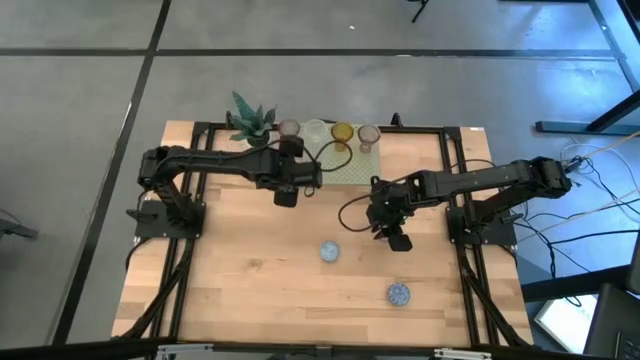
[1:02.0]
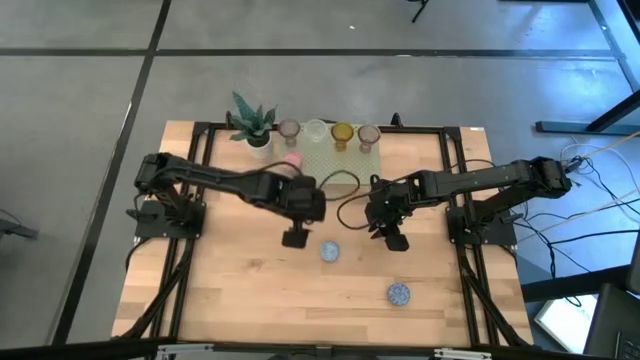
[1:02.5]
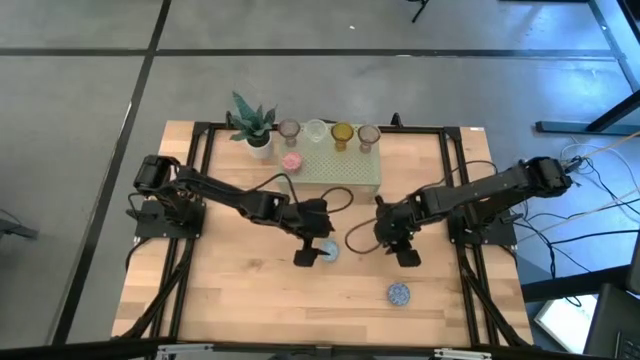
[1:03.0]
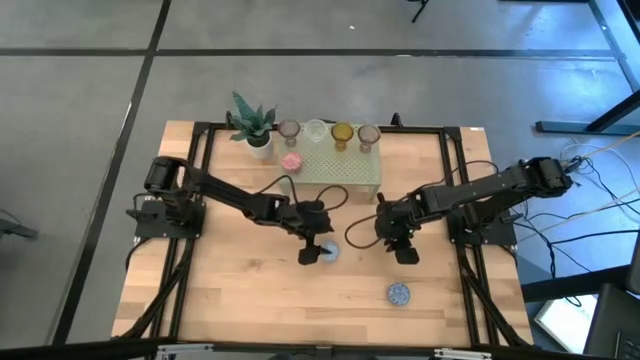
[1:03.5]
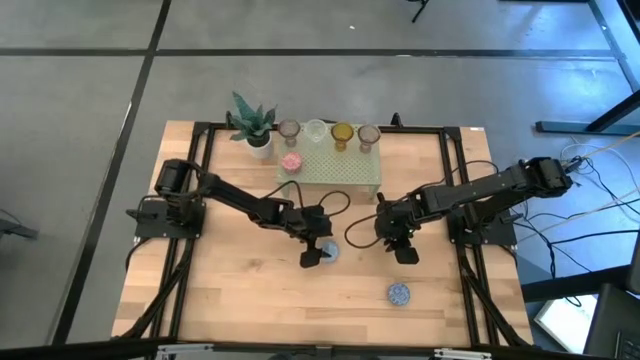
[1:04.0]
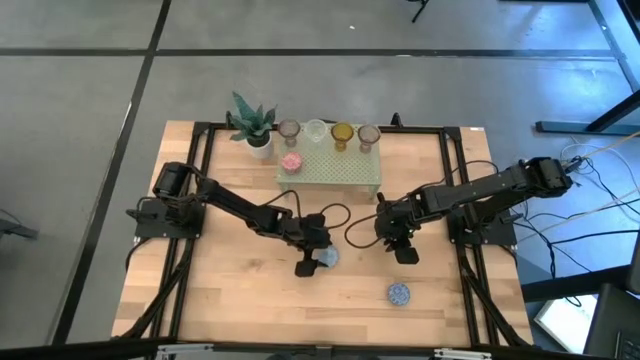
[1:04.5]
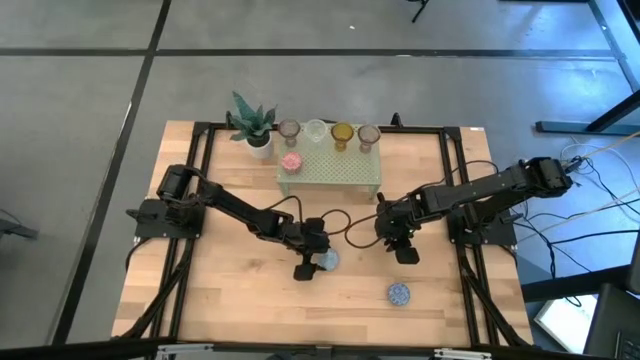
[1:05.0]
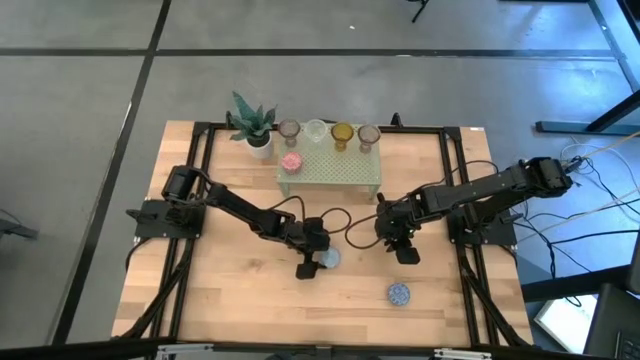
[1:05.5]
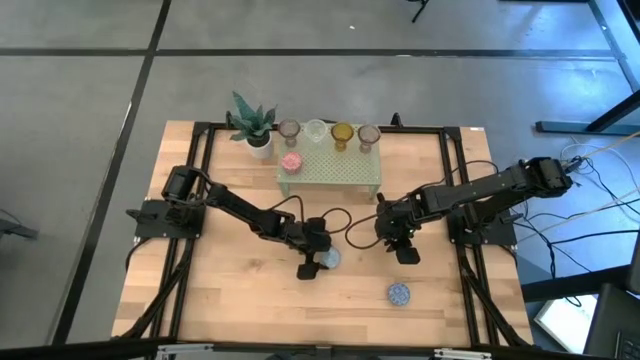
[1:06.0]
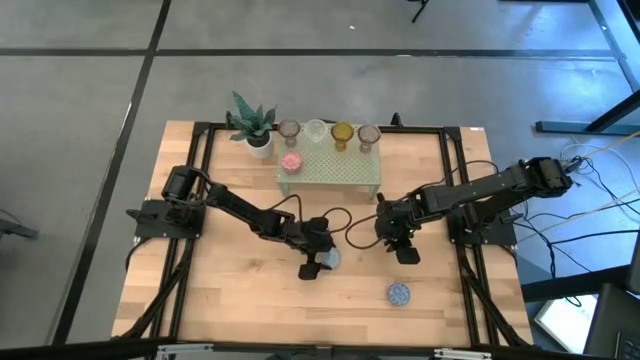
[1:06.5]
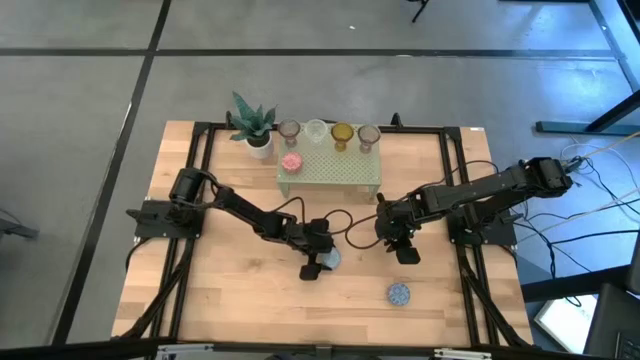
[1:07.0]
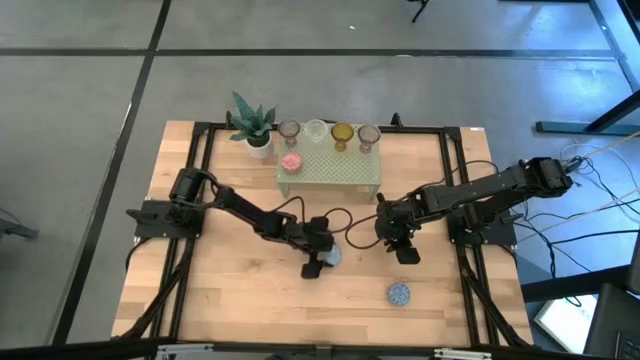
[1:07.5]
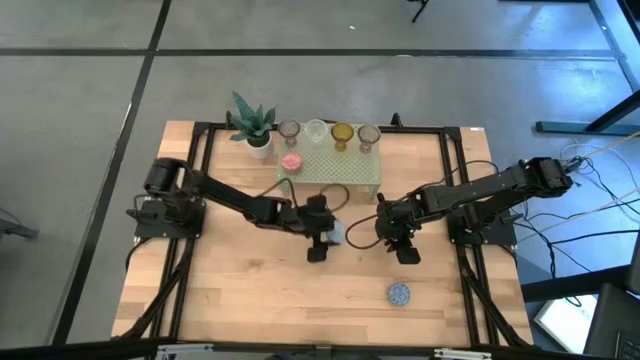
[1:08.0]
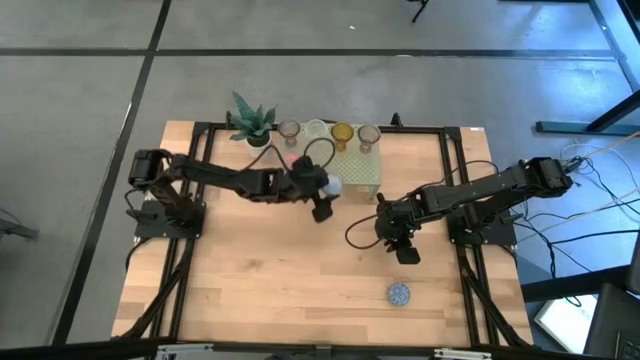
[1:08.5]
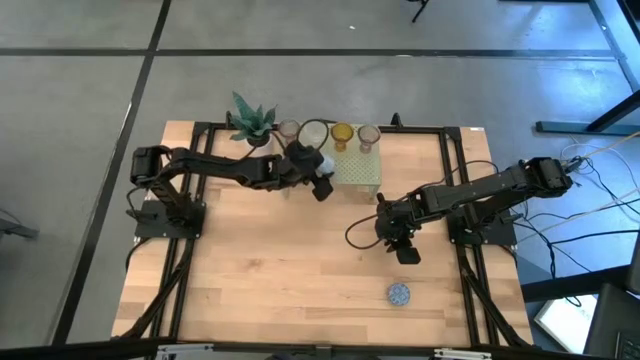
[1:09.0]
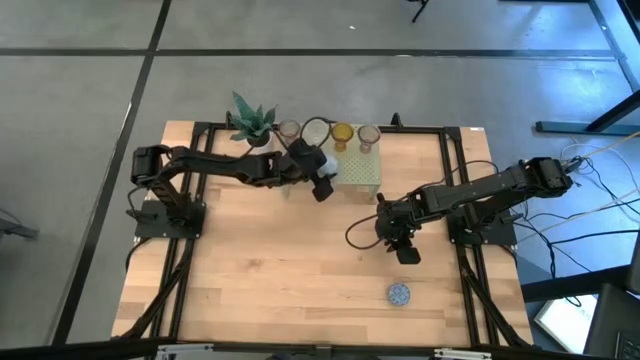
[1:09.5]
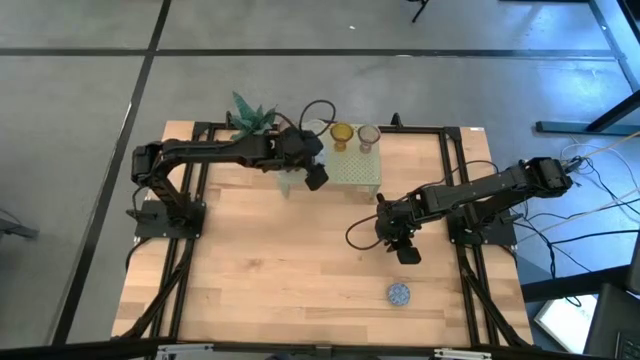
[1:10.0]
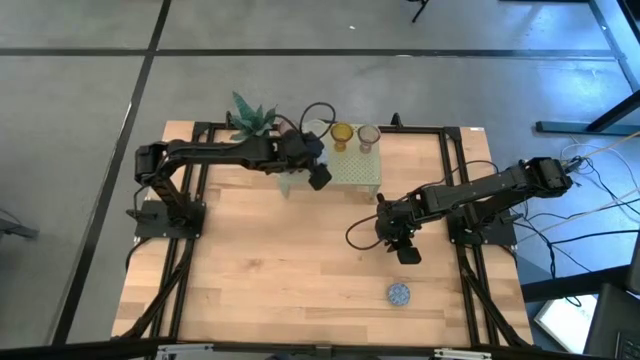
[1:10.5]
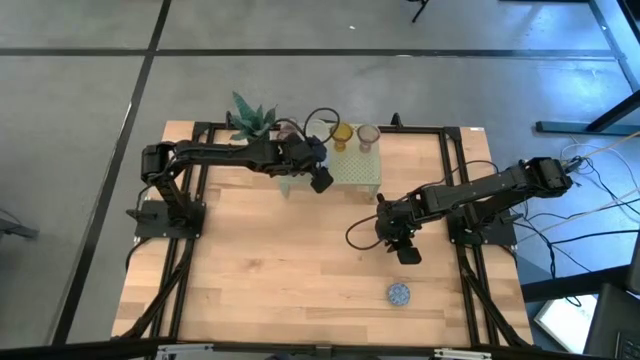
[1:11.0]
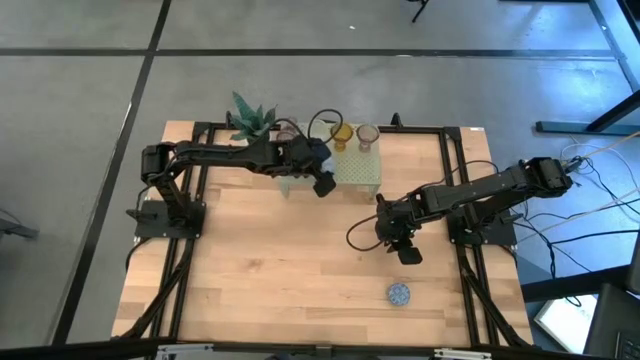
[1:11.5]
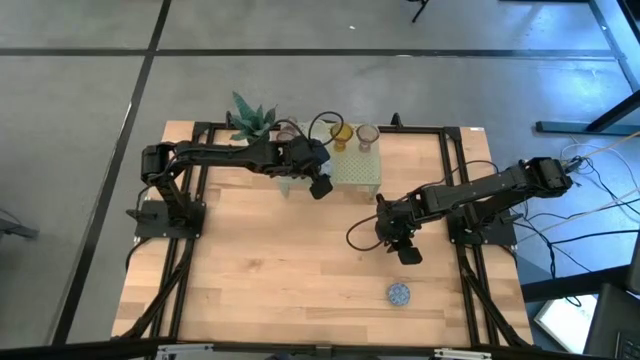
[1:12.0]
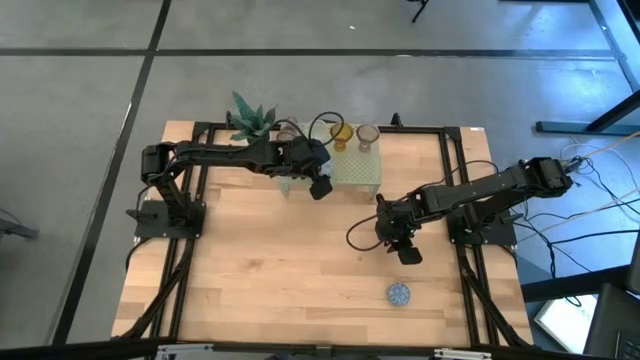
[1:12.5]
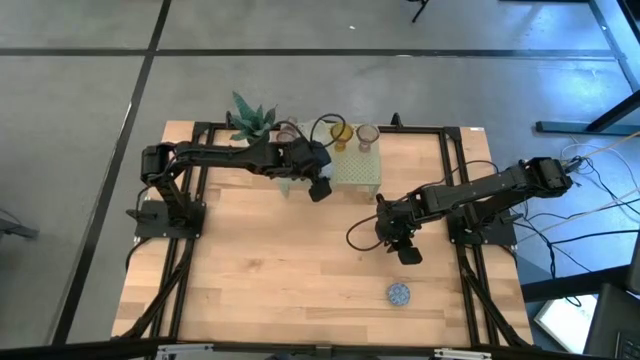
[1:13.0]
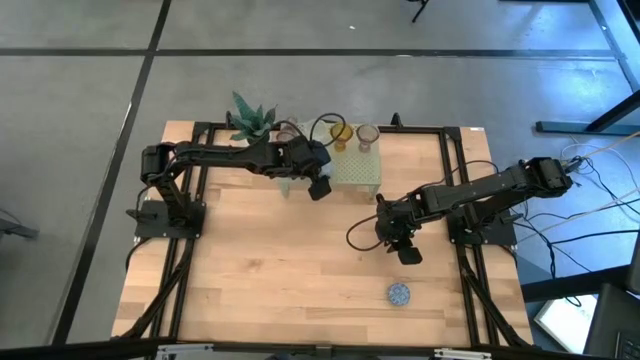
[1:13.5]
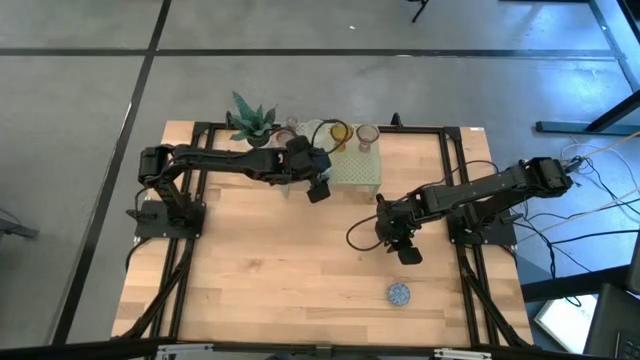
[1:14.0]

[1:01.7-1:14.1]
Task: Pick & Place candle stick holders
Put the light blue scented candle on the shelf

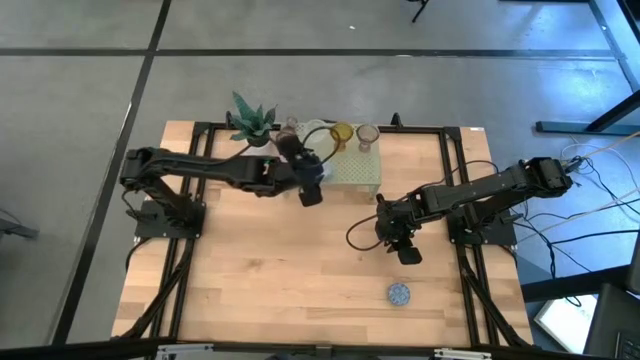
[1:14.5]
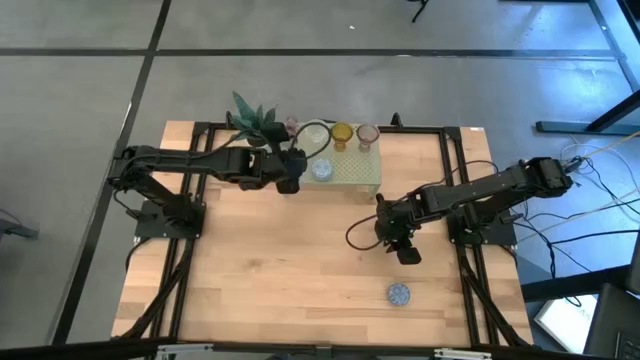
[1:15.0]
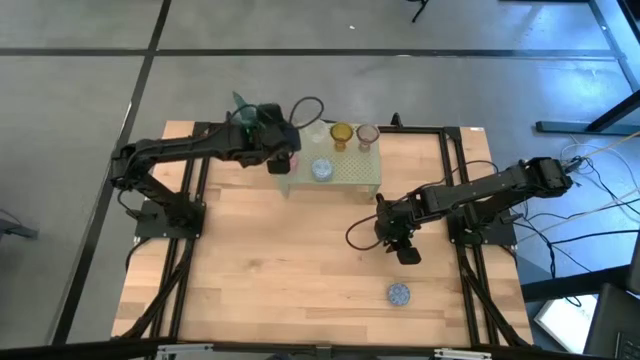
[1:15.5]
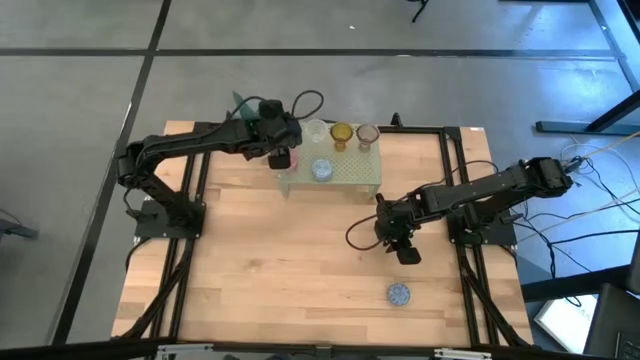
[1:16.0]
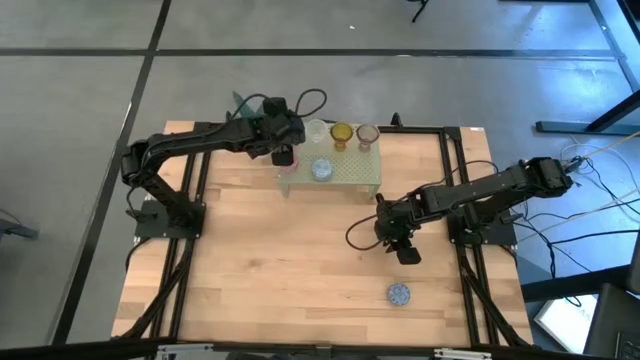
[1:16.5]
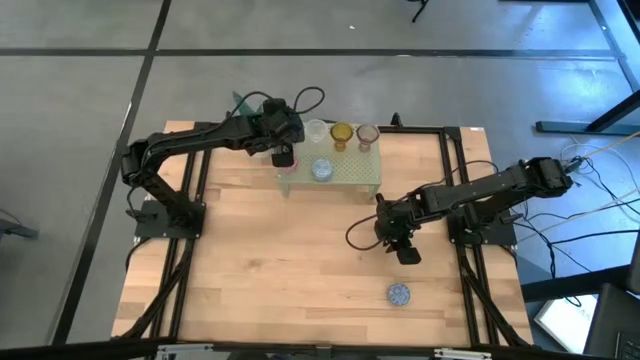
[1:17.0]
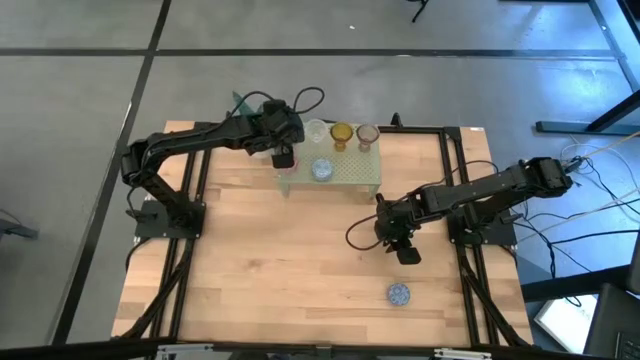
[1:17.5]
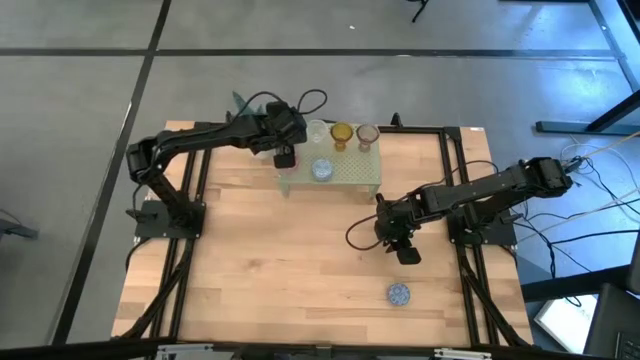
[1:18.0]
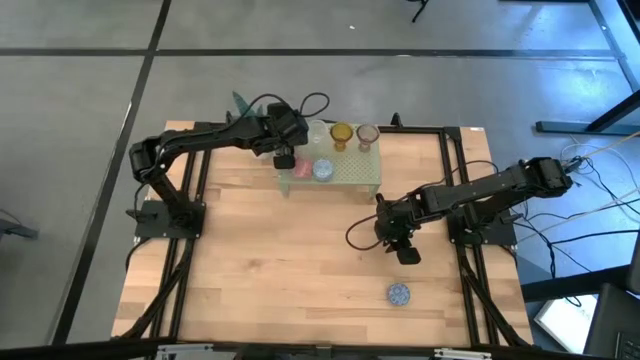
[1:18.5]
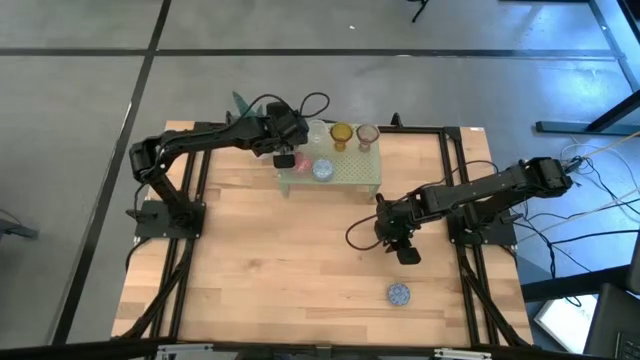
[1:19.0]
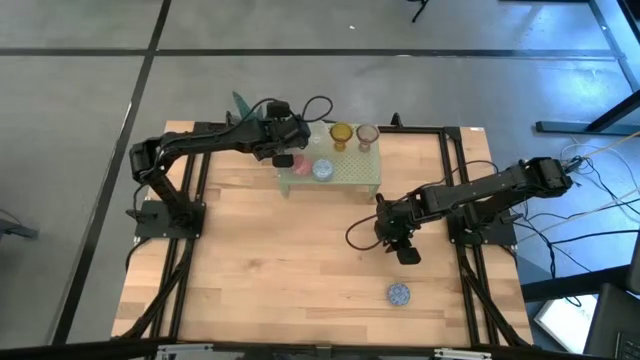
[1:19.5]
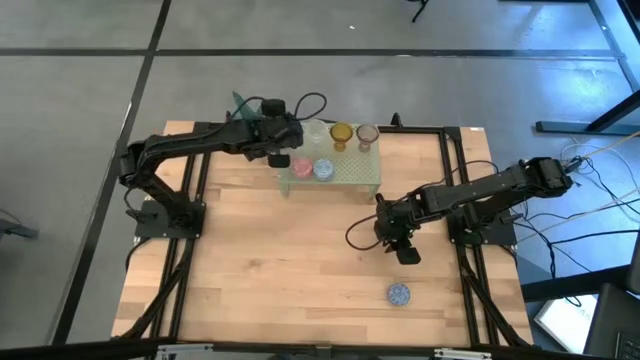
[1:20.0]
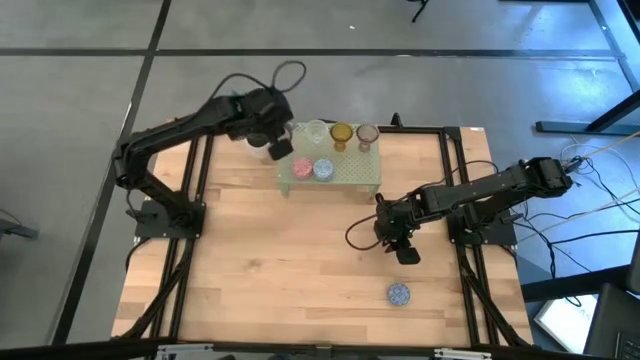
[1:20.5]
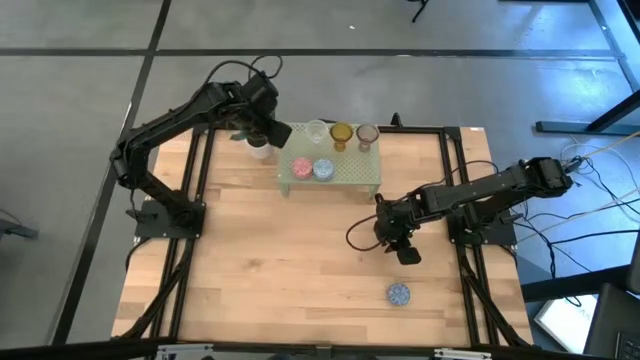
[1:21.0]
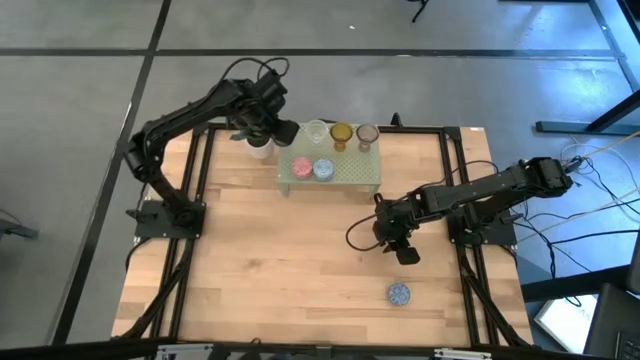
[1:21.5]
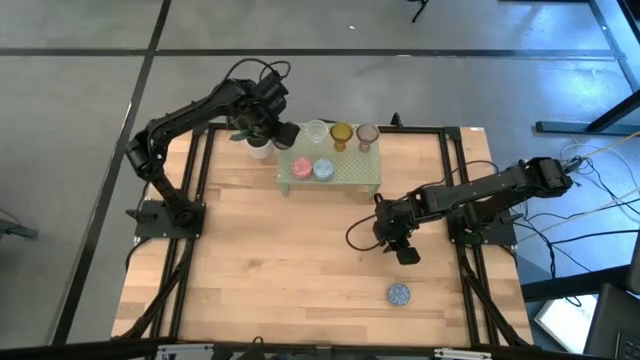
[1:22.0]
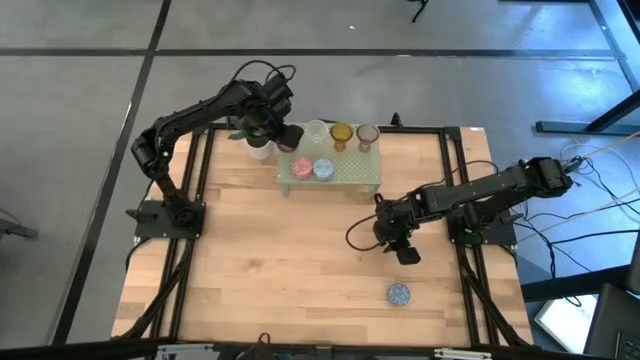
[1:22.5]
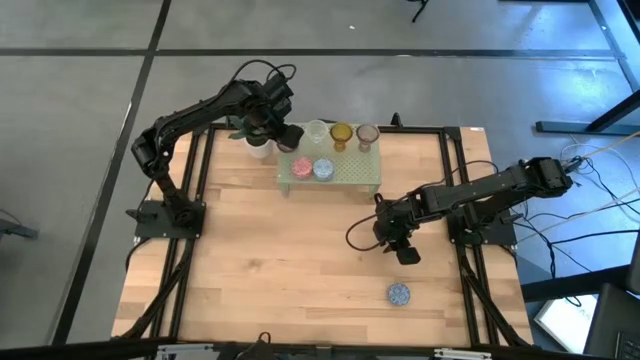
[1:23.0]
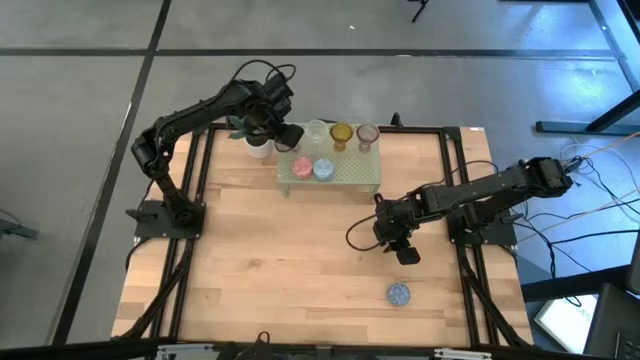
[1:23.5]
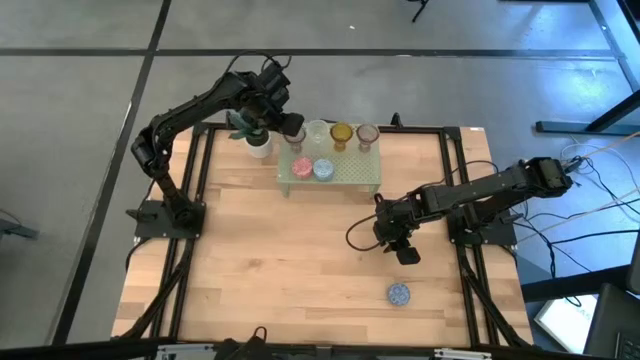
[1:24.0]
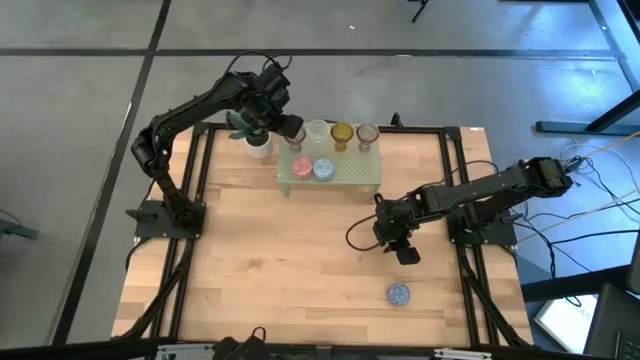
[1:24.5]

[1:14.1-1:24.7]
Adjust the pink glass candle holder
